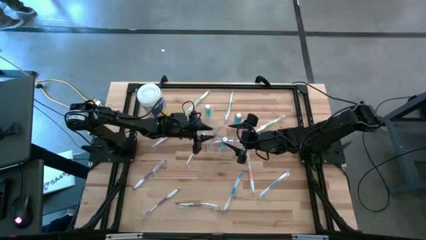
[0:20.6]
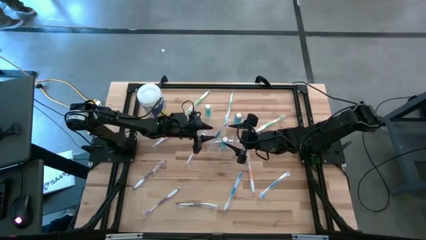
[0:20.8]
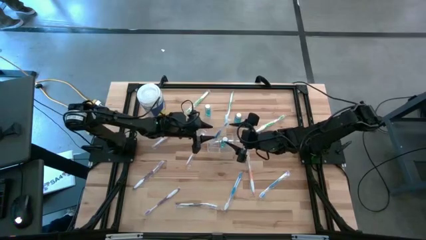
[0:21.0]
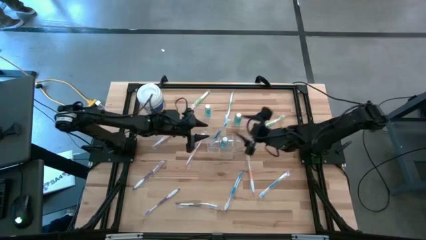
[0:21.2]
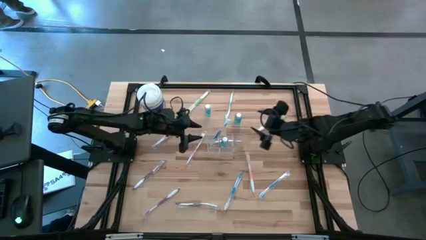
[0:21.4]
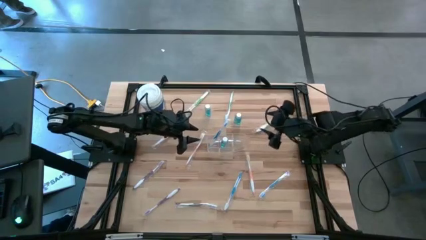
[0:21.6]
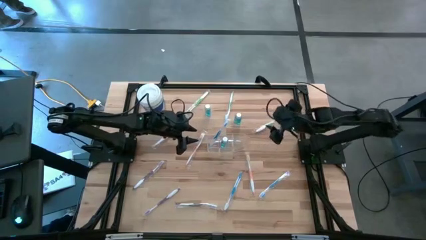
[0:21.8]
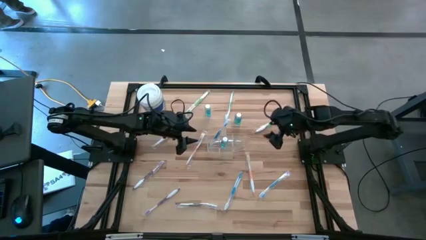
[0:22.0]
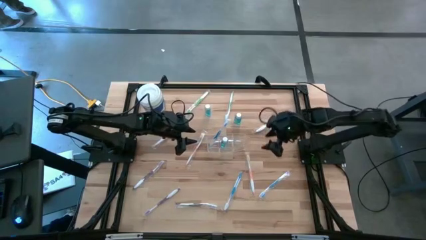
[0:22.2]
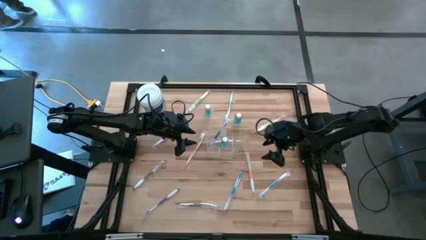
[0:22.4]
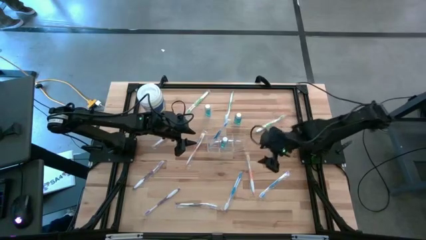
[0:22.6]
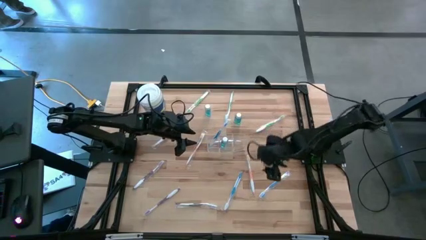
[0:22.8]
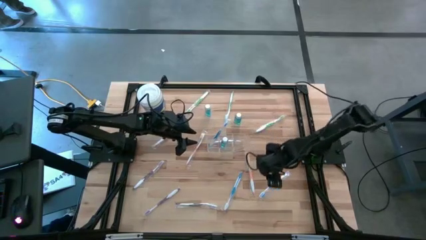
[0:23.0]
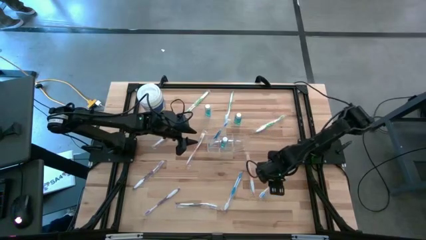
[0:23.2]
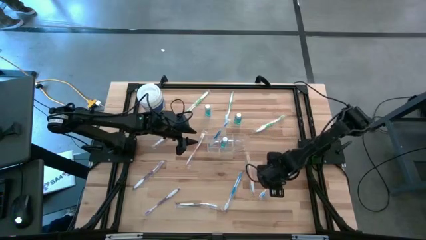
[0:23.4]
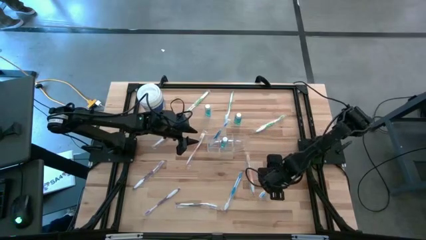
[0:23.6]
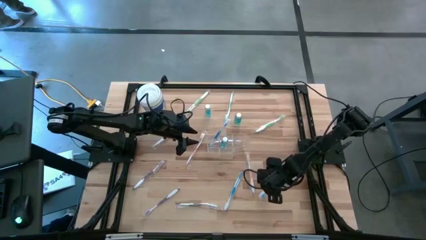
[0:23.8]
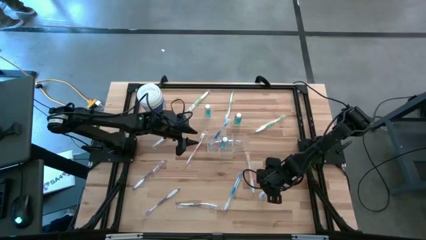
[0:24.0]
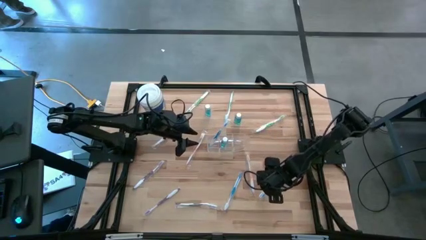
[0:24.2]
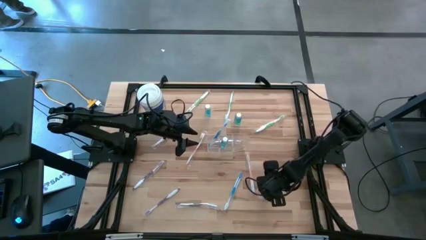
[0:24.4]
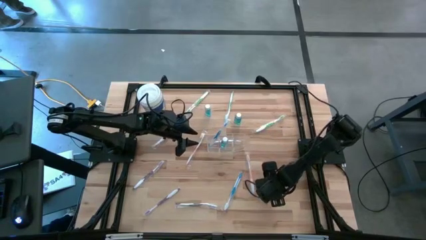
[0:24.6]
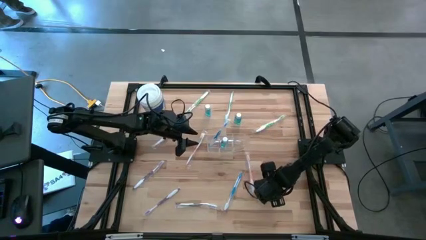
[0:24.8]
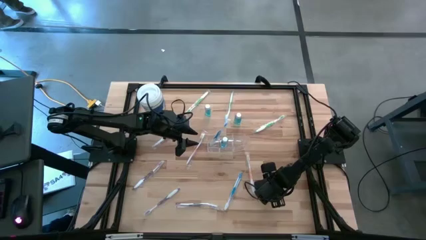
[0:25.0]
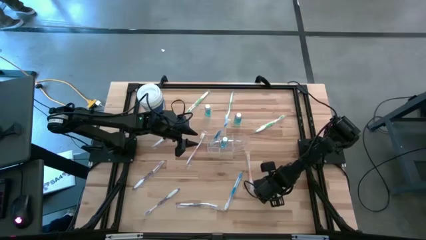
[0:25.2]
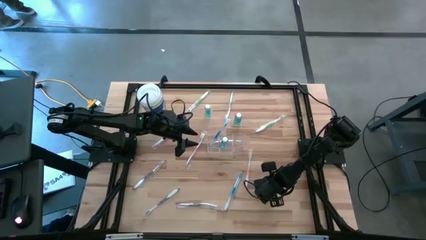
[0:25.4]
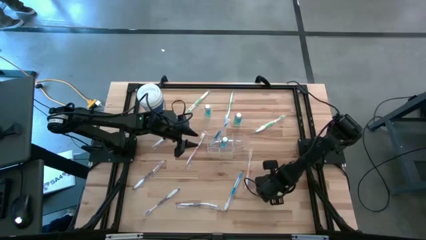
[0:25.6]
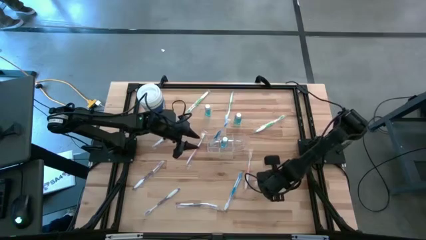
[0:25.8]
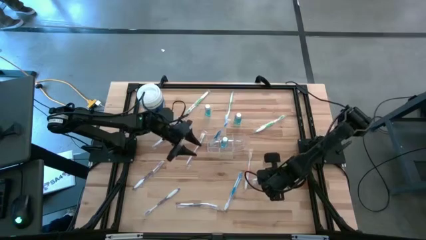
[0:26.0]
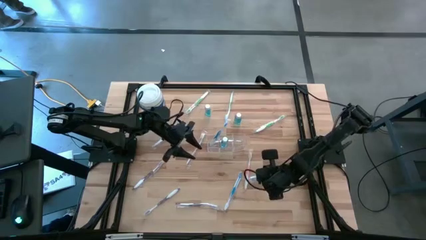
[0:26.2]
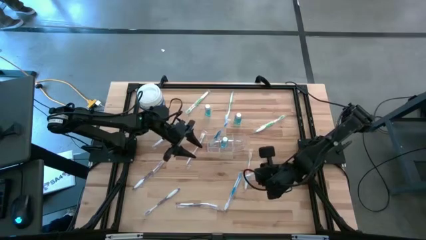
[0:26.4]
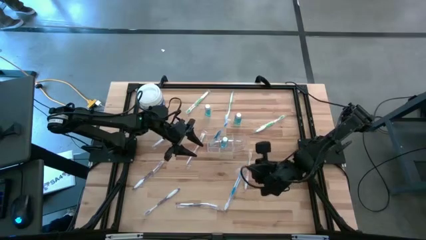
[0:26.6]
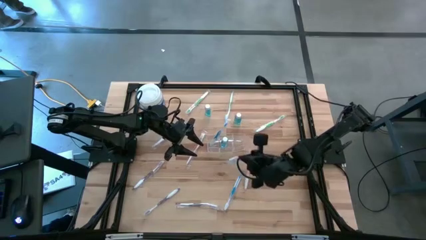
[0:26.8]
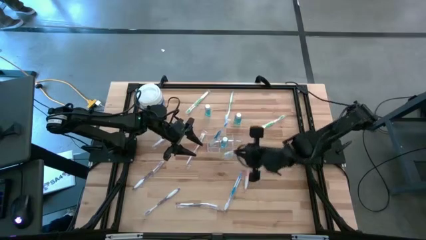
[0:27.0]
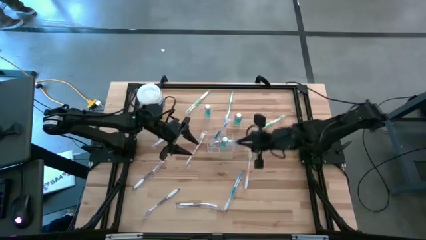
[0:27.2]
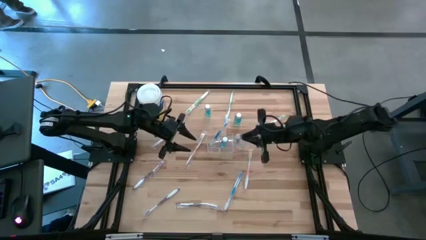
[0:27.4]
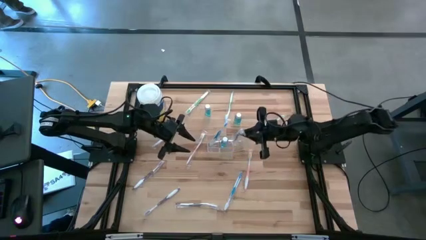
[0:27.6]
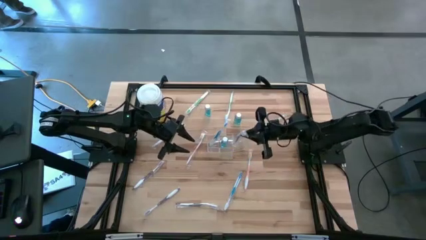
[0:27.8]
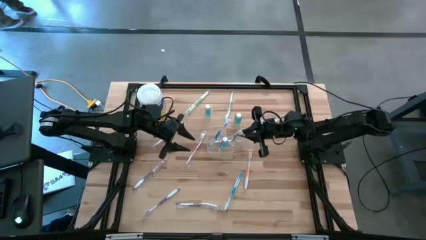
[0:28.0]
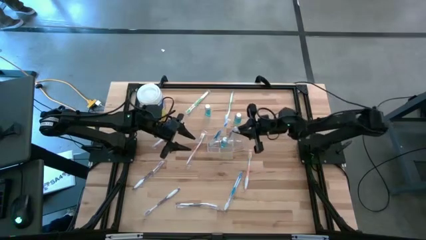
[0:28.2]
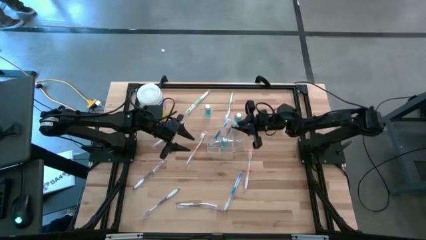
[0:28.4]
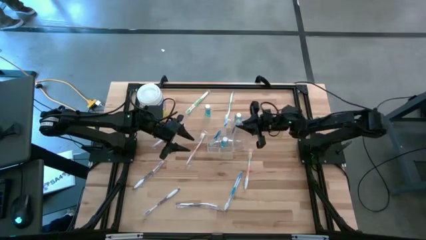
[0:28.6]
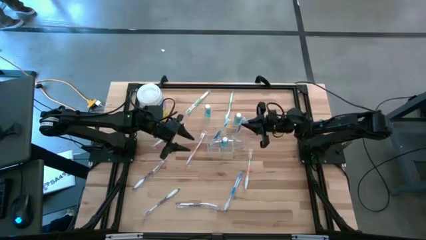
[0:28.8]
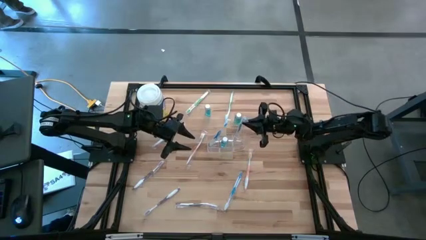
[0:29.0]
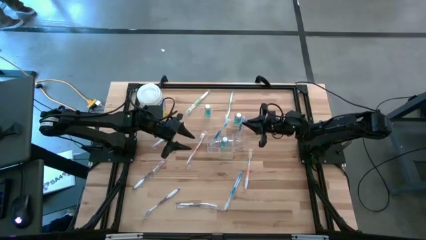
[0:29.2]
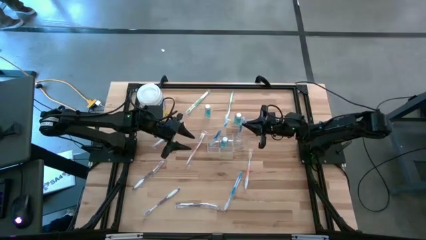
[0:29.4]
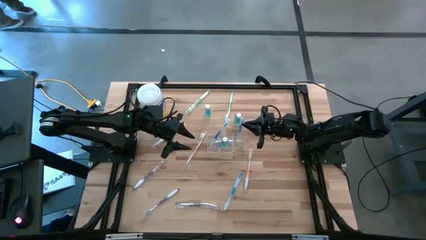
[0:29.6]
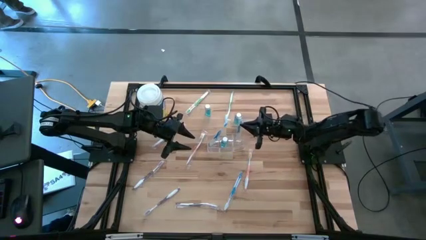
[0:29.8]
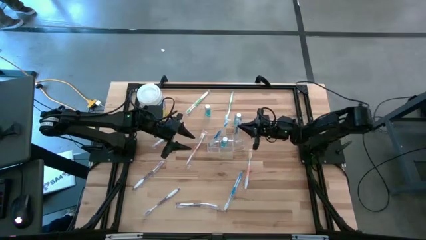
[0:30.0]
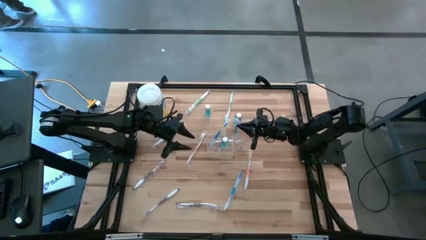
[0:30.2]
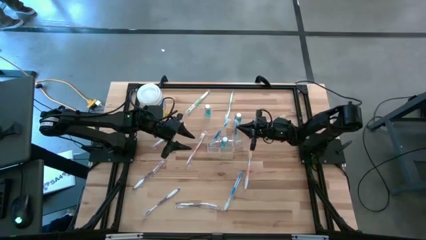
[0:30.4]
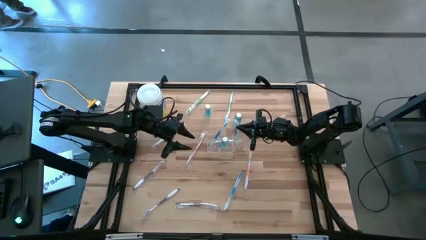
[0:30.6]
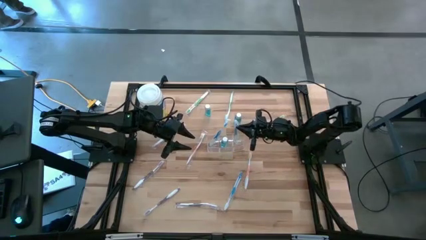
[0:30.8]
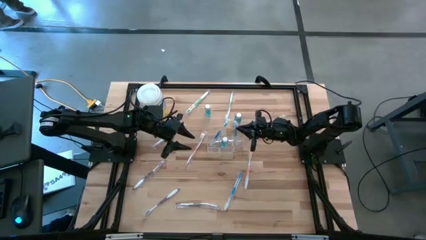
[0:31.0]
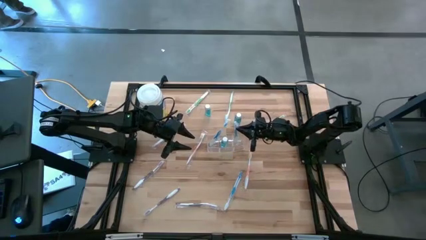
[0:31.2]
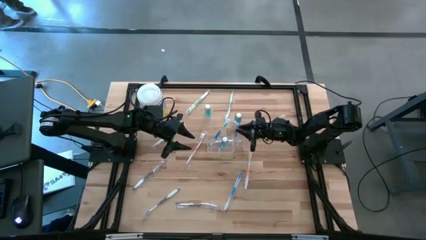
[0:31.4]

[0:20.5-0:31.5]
Task: Pick & Place toothbrushing station
Put the right blue toothbrush into the right section of the transparent organizer
